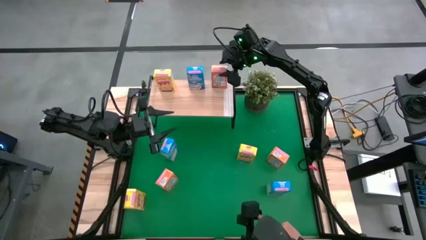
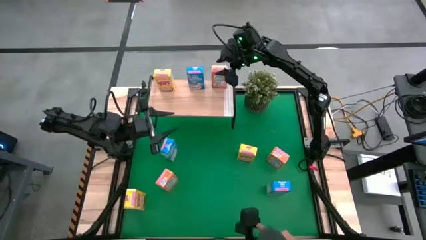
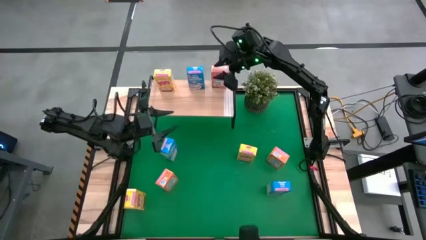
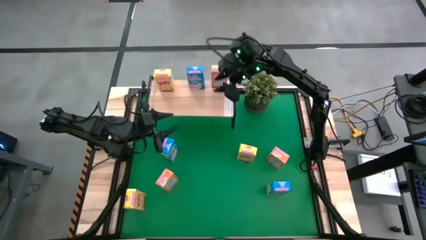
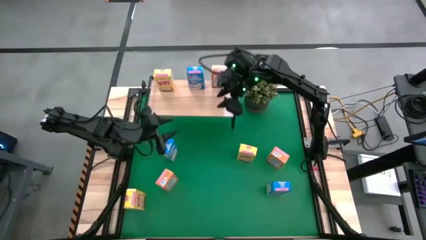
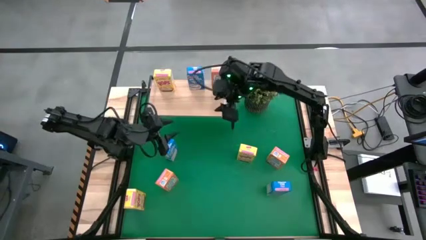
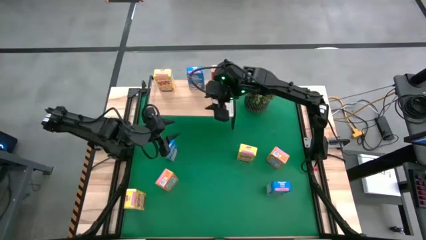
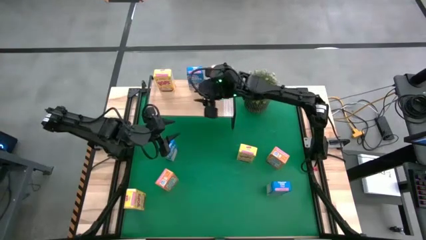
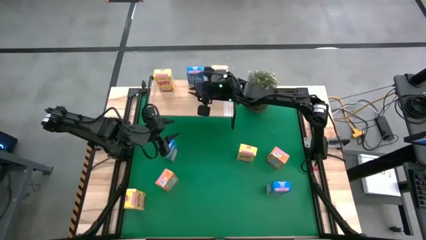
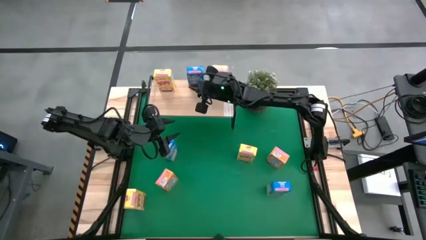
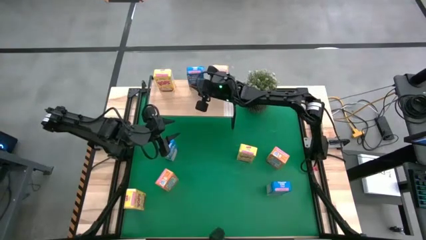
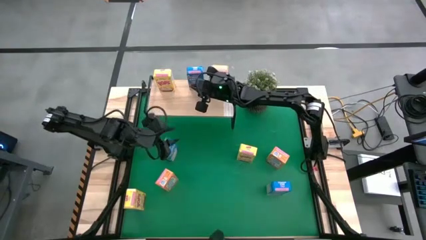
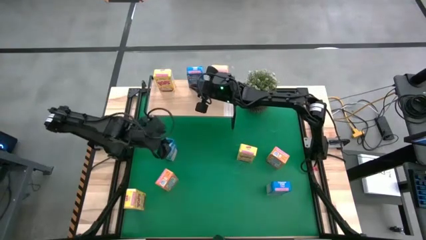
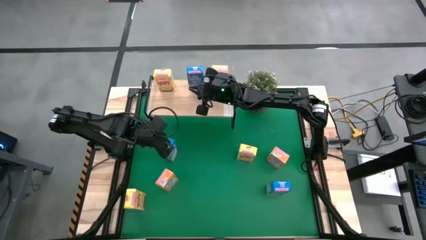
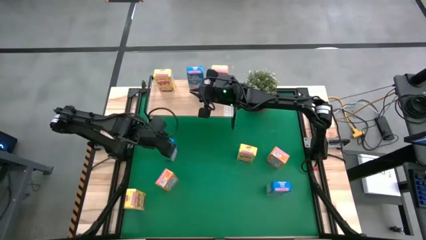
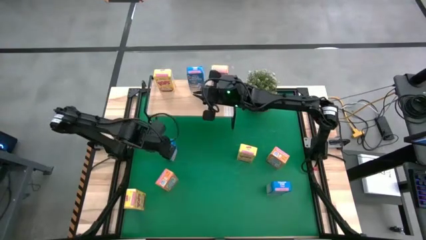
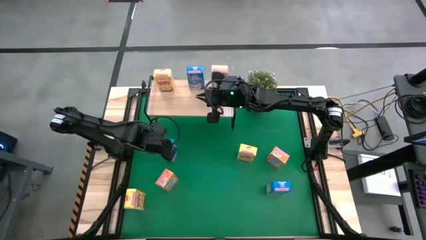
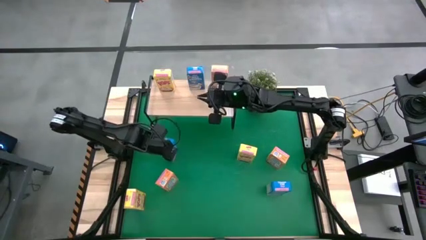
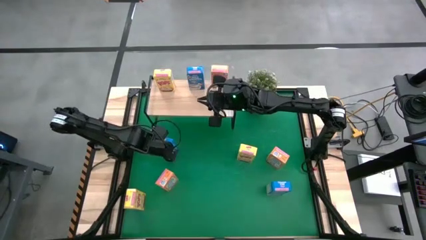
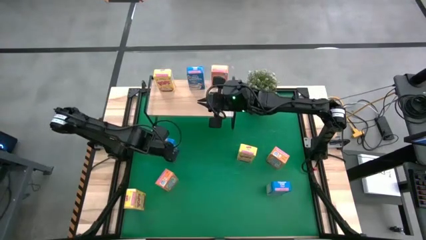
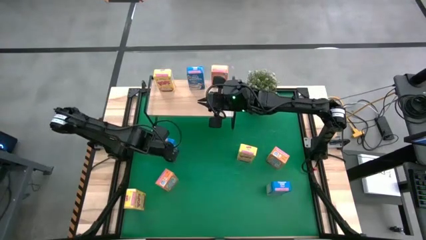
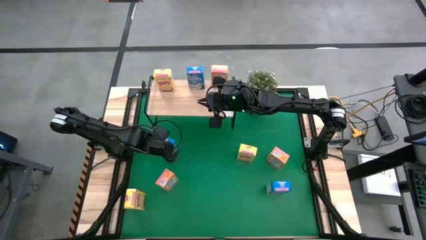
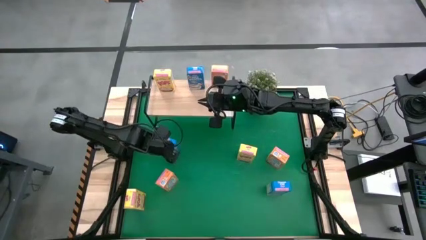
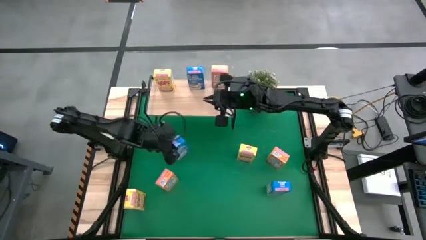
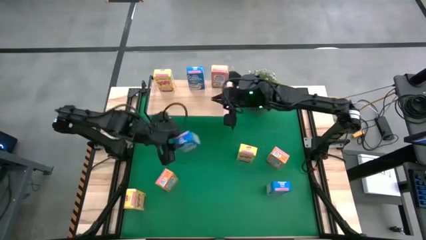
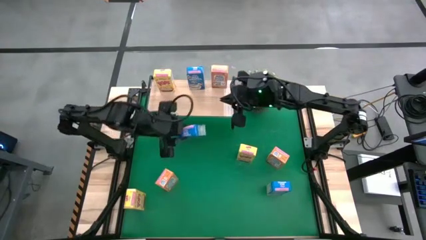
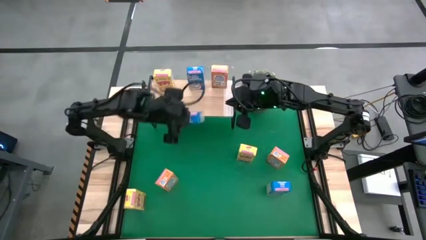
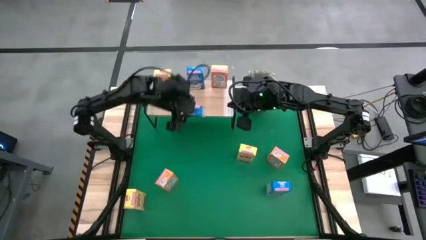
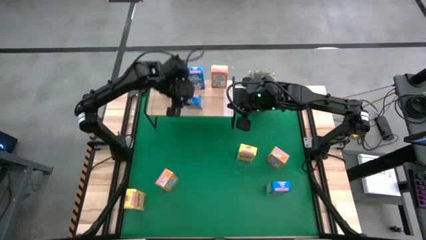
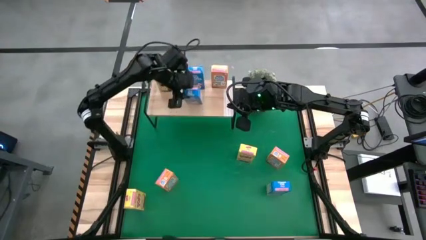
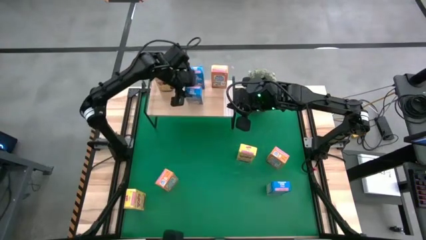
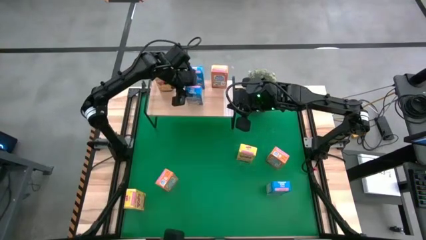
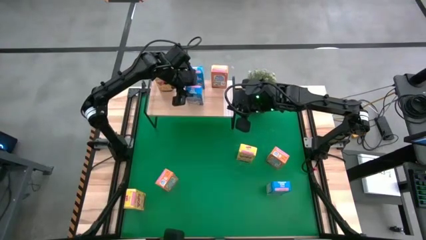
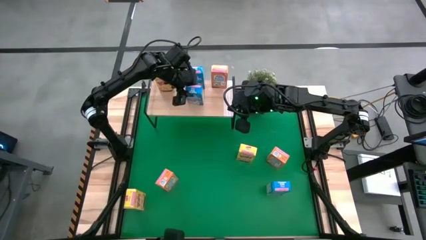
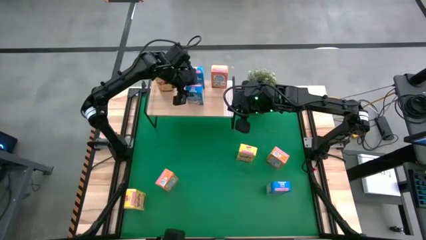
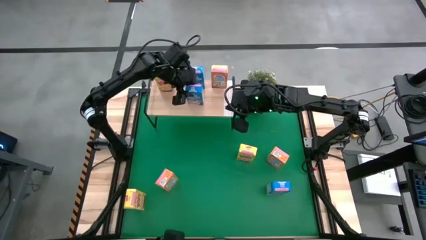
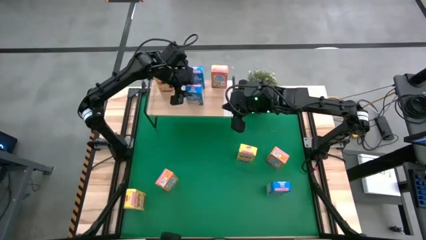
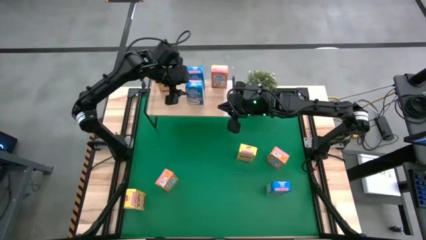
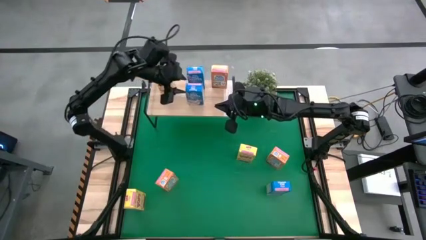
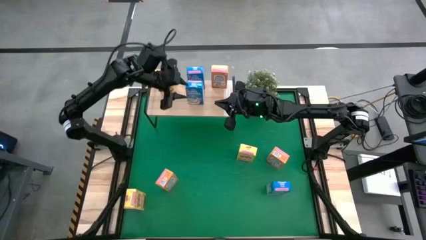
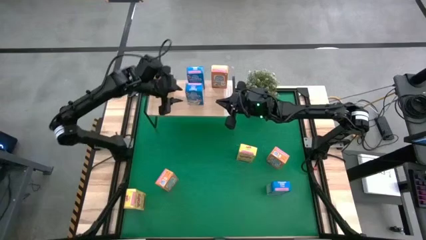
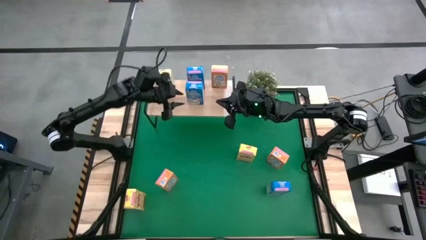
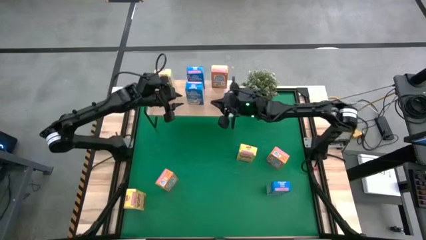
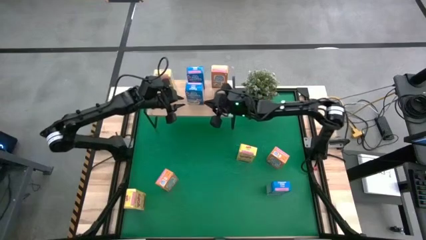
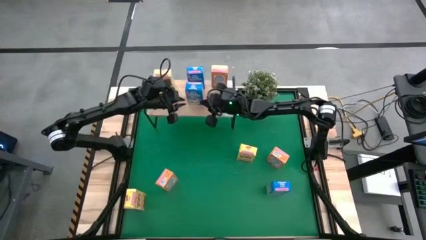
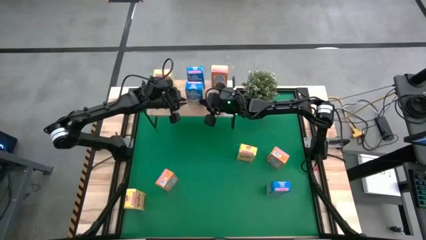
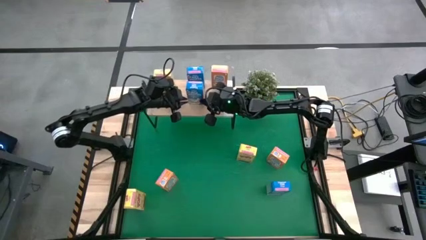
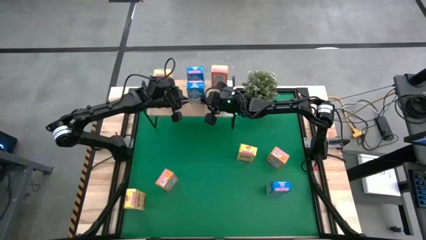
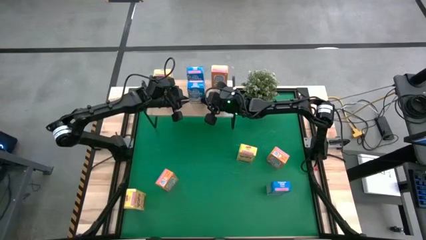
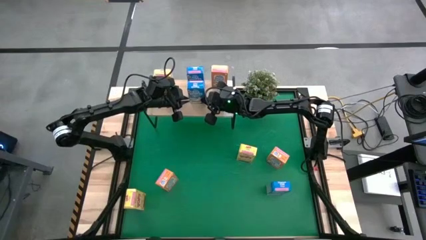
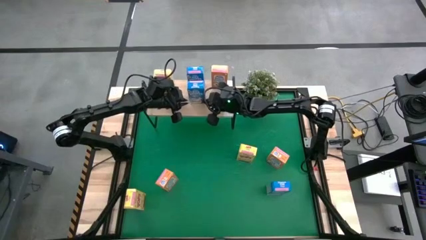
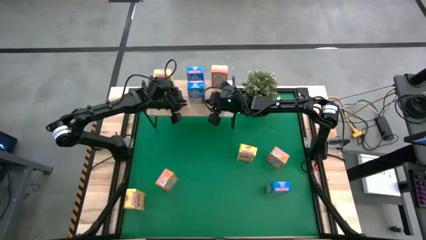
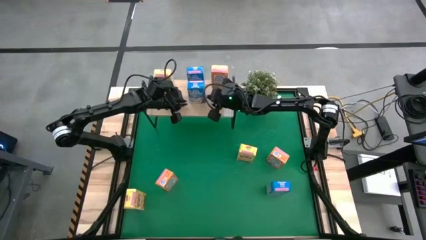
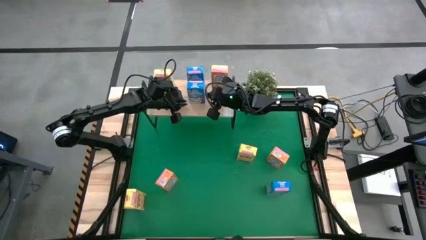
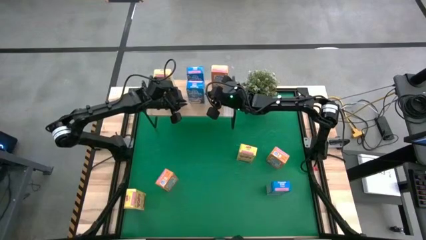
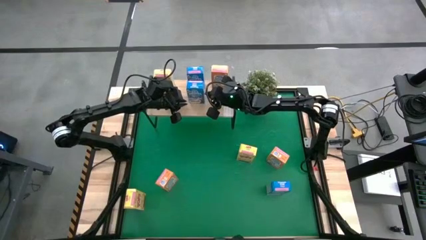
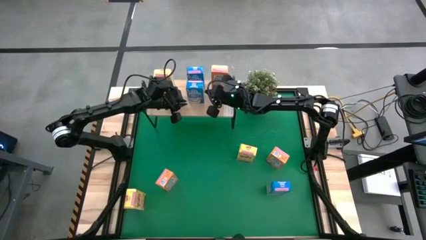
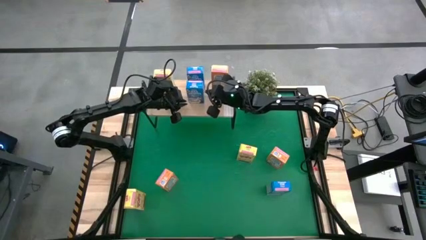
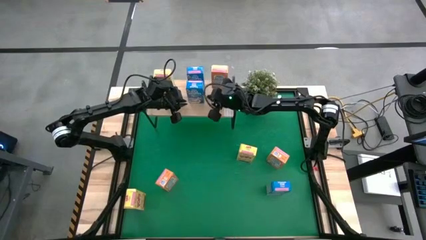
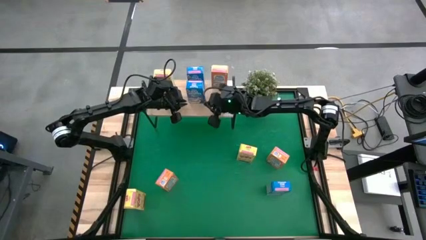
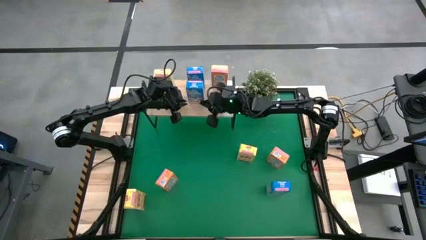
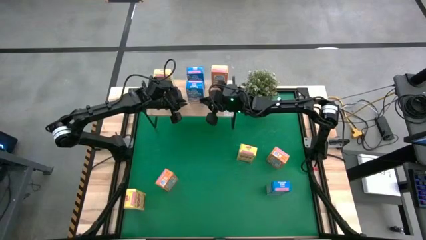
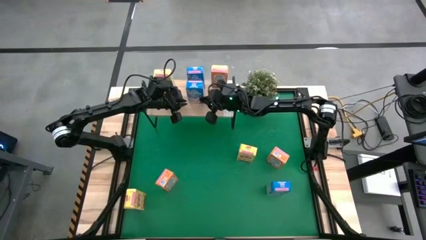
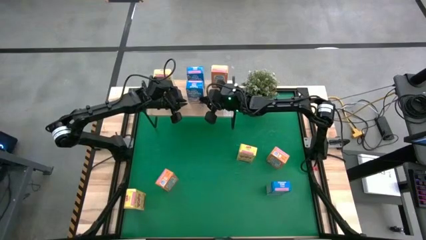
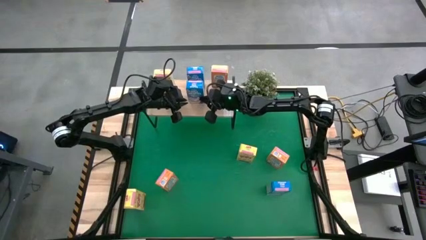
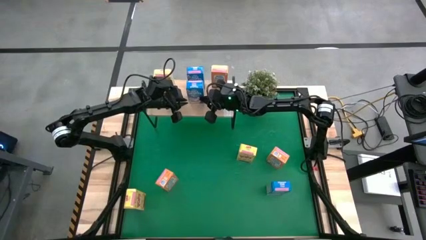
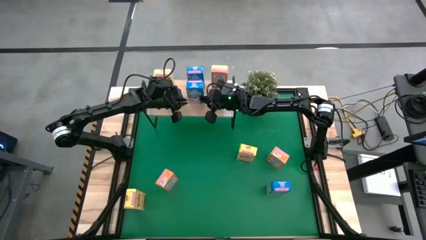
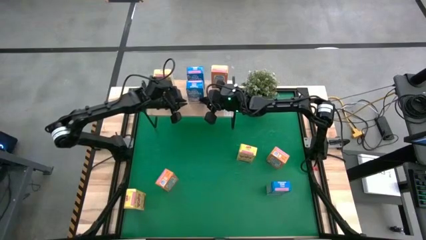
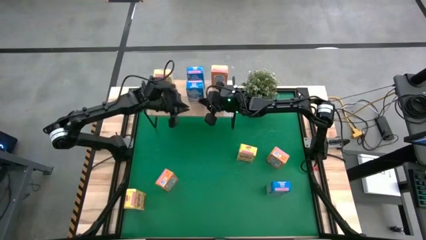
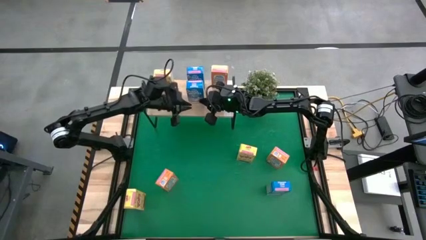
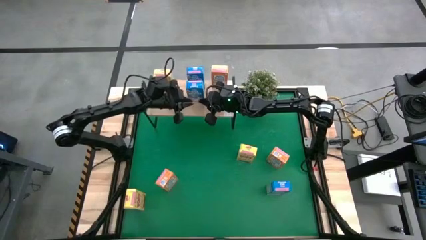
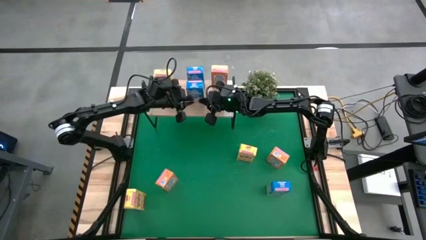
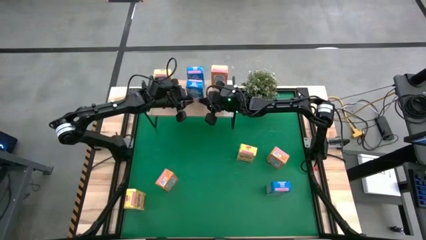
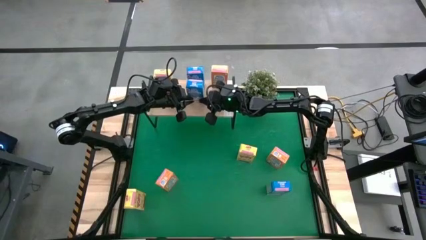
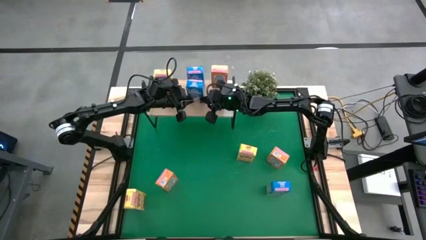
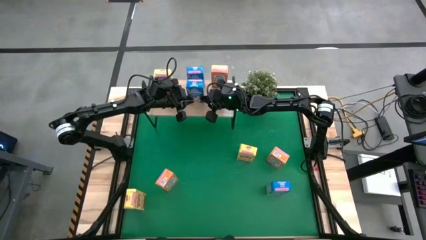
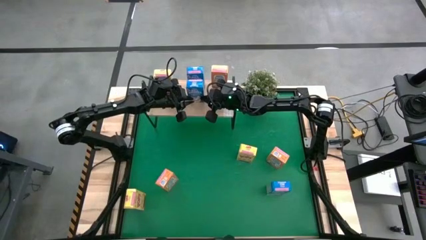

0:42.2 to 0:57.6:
Task: Stack cereal on shelf
Put the left blue cereal box on the shelf

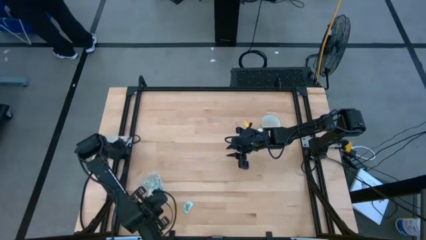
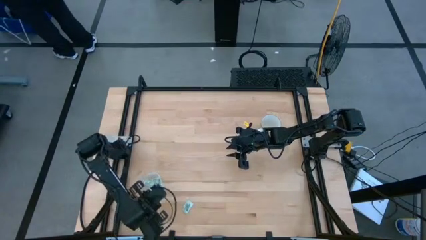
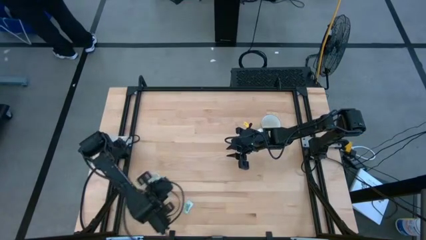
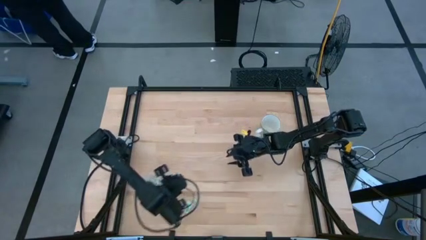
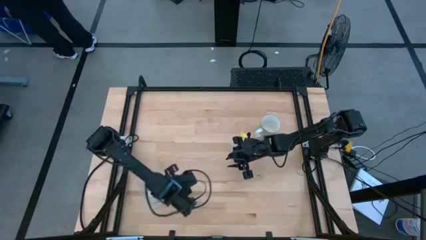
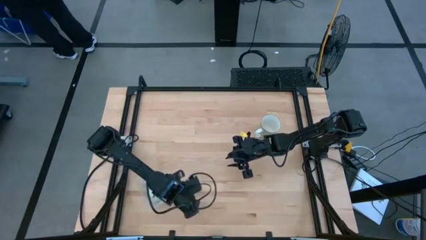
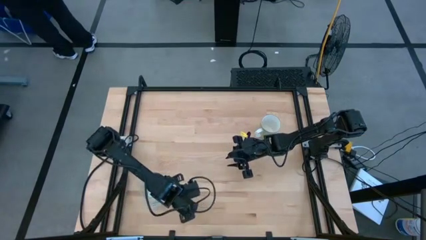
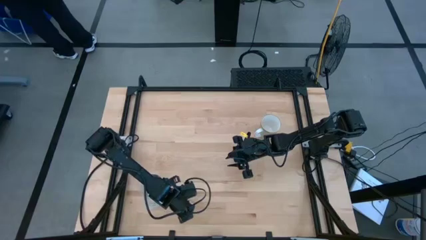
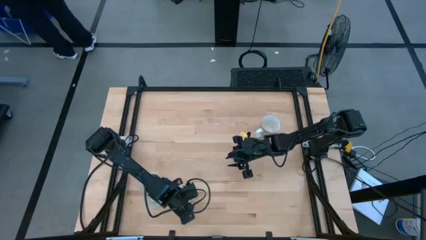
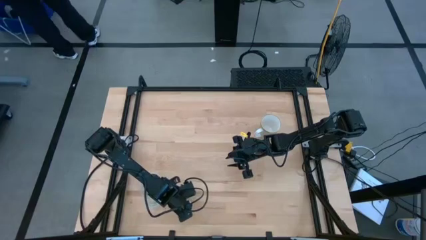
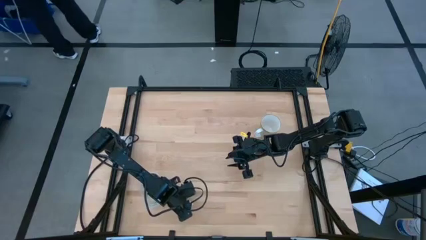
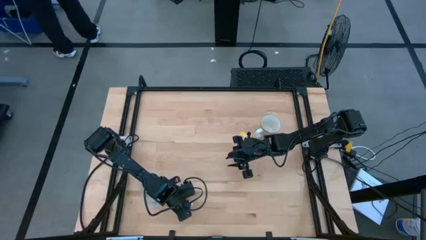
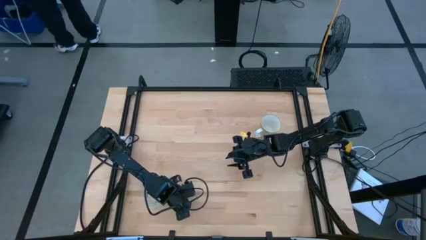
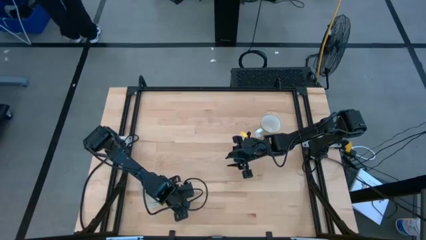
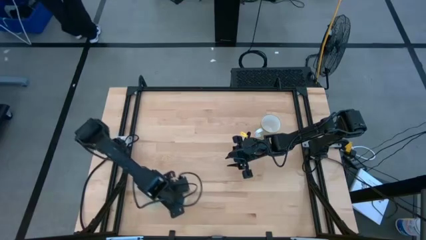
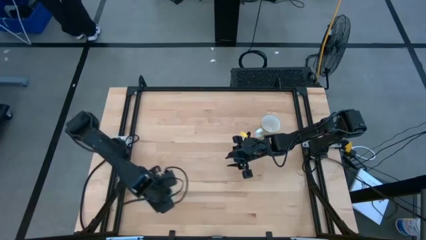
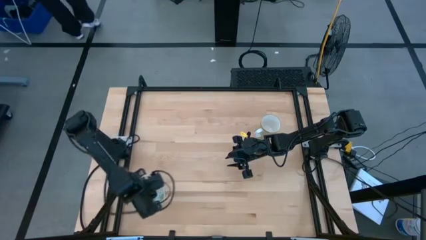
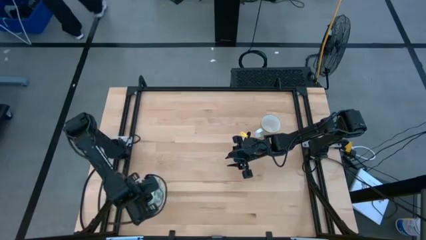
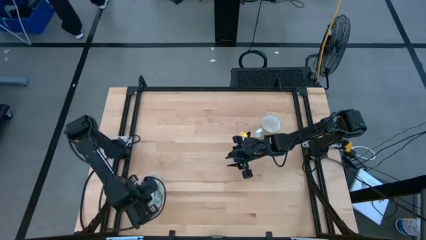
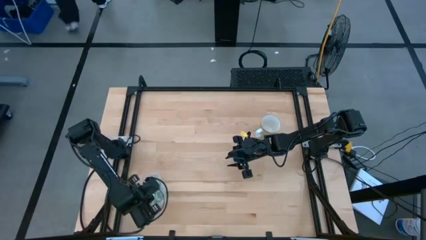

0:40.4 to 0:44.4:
Task: Pick and place Stevia / Truvia into bins
Put the stevia packet into the transparent bin
